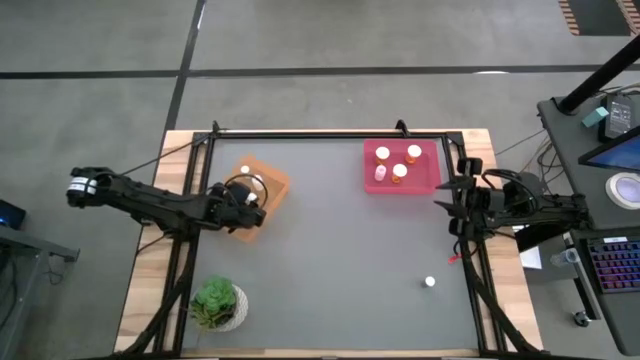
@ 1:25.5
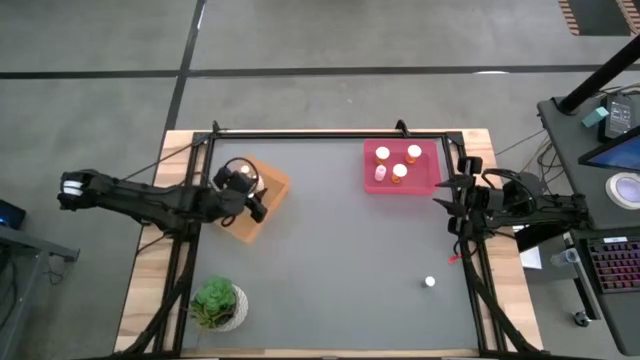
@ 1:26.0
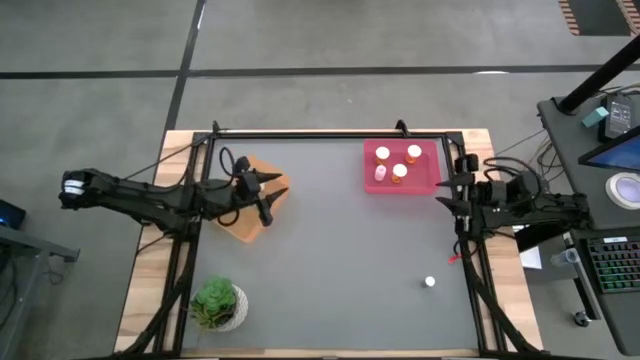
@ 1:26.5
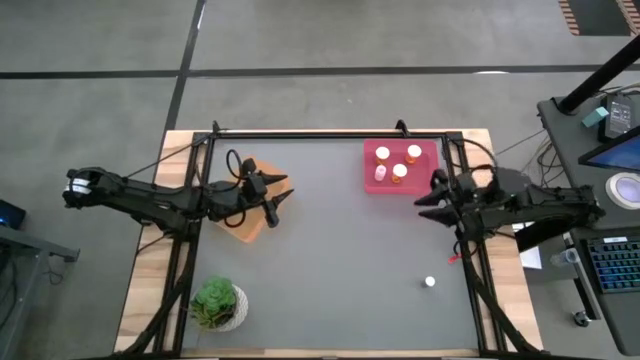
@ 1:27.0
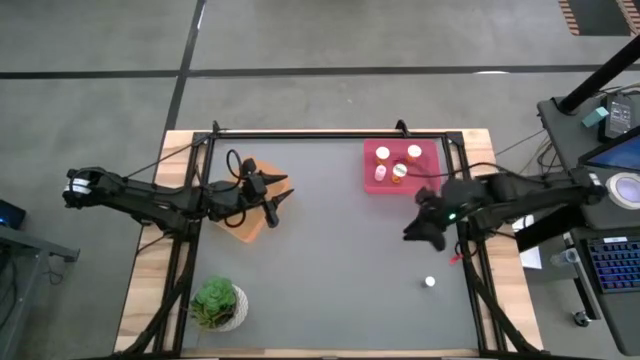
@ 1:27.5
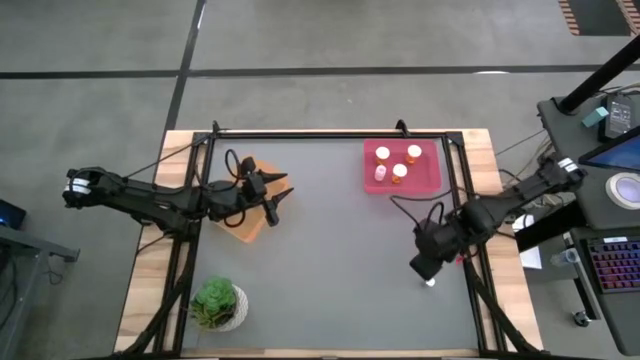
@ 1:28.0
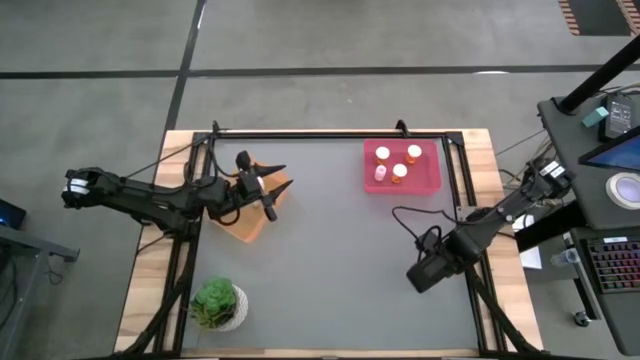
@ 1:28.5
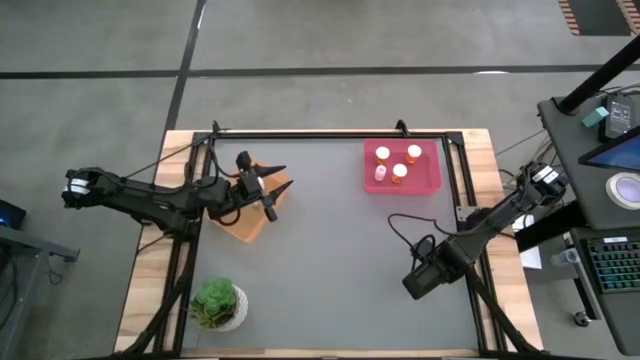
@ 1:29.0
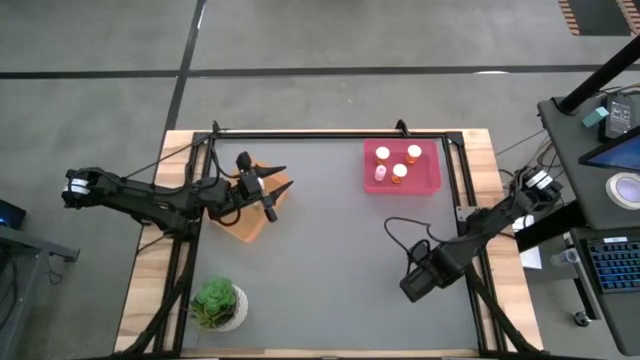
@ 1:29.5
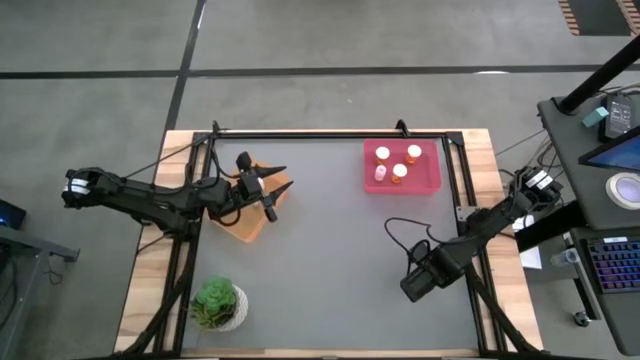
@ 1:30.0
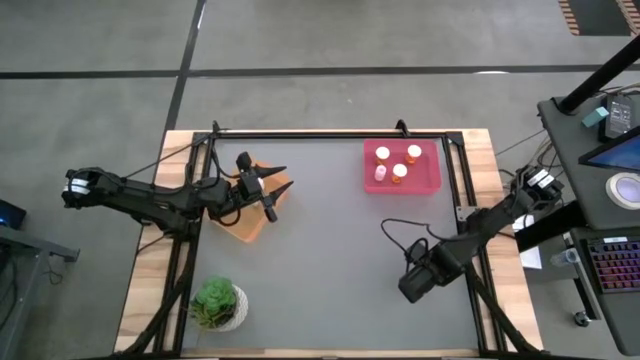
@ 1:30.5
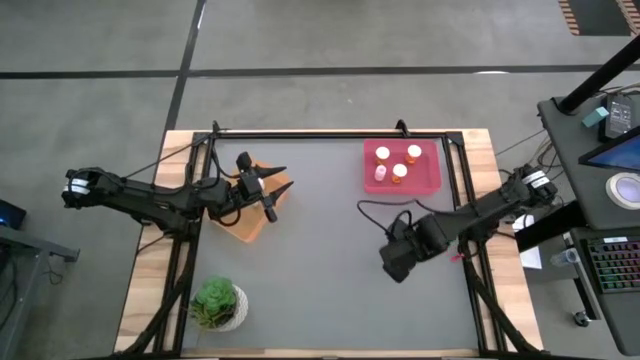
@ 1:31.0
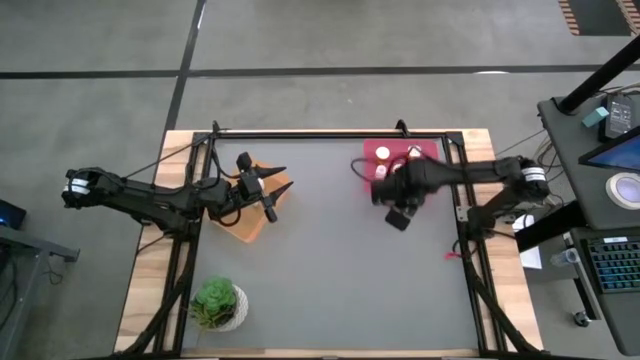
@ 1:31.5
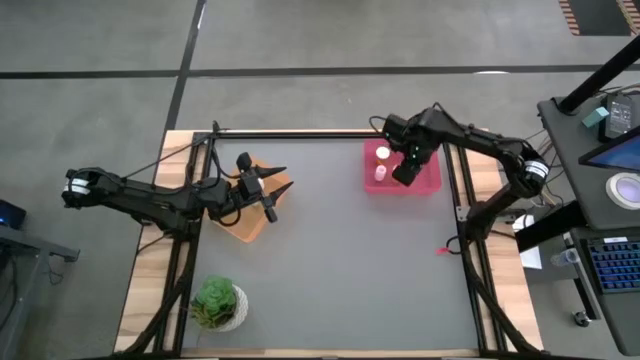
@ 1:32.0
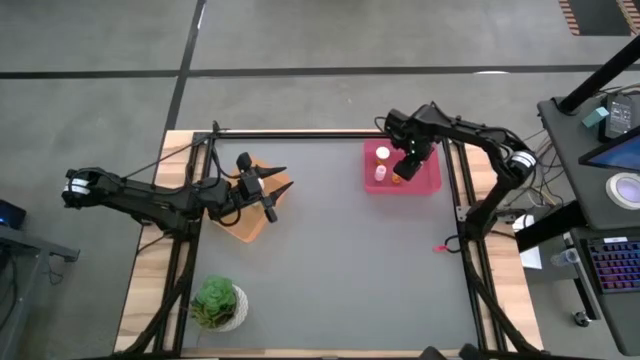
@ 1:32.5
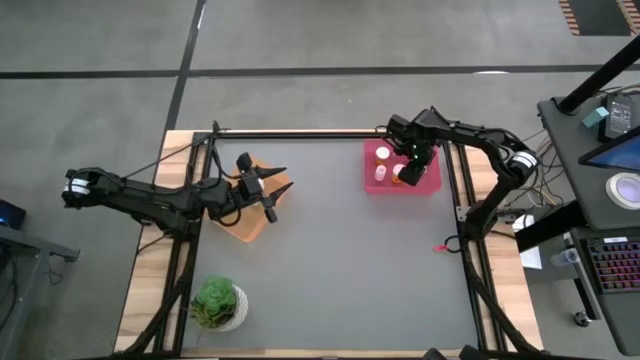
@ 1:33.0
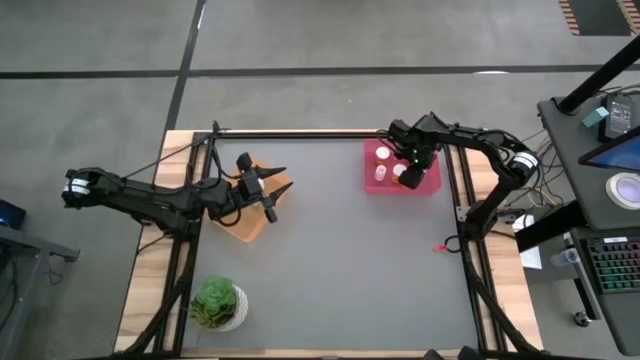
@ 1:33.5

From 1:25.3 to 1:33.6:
Task: Pick and place medicine bottles into bin by pill shape (circle, oval)
Put the blue capsule bottle into the pink bin

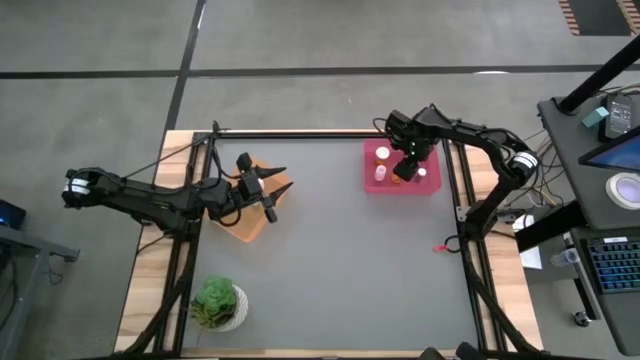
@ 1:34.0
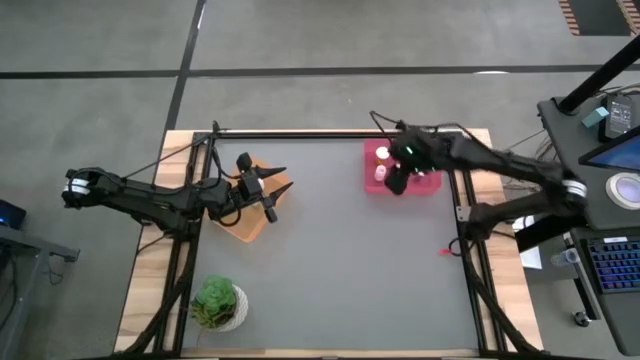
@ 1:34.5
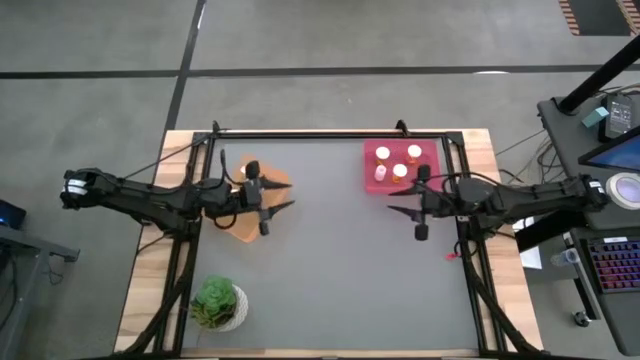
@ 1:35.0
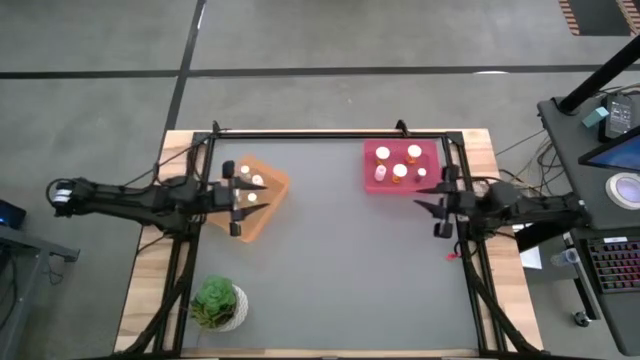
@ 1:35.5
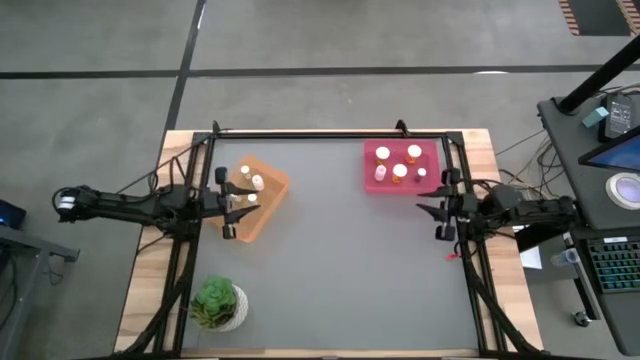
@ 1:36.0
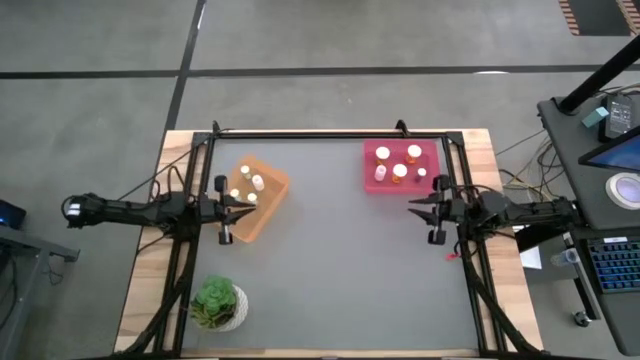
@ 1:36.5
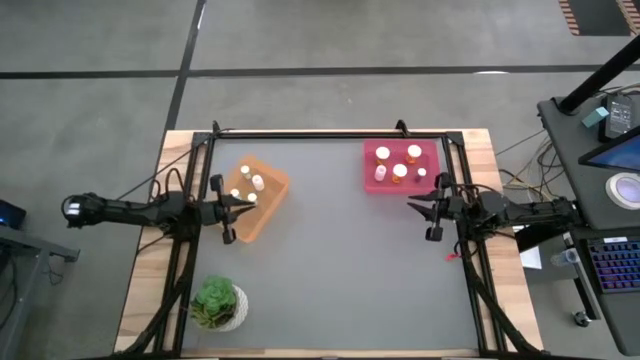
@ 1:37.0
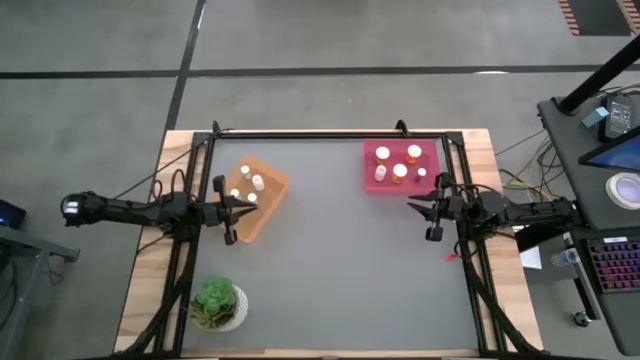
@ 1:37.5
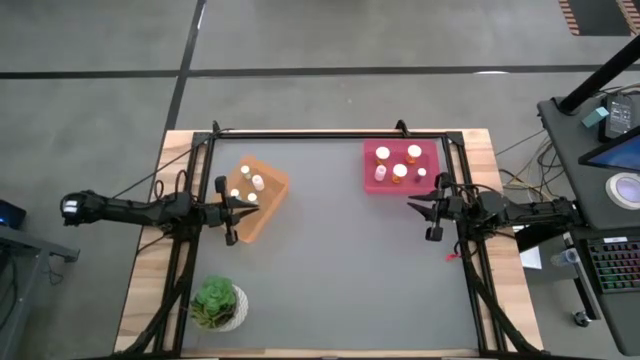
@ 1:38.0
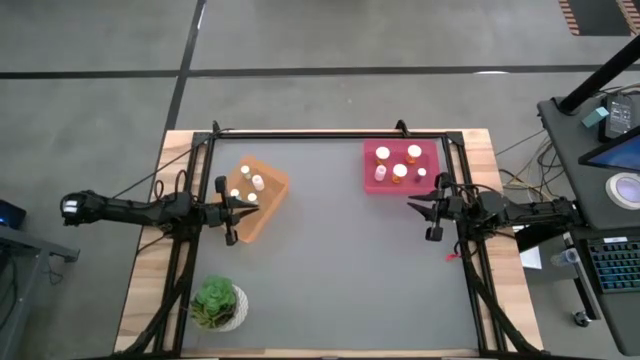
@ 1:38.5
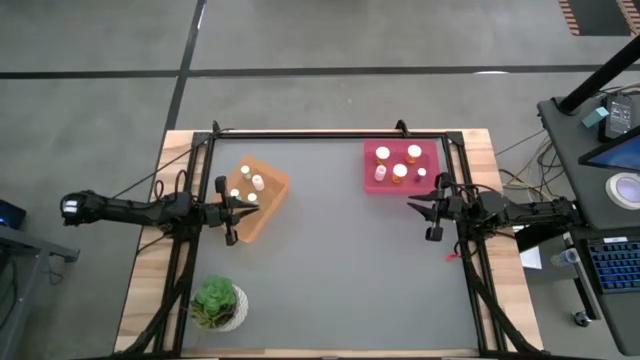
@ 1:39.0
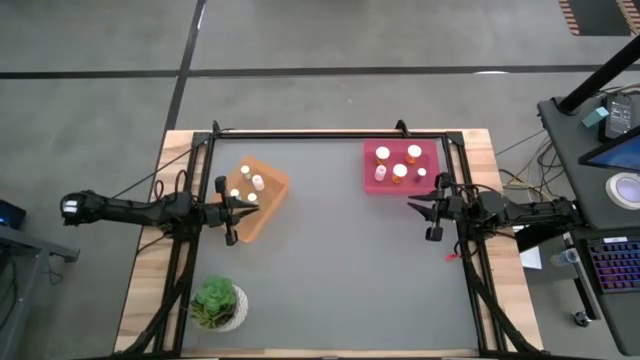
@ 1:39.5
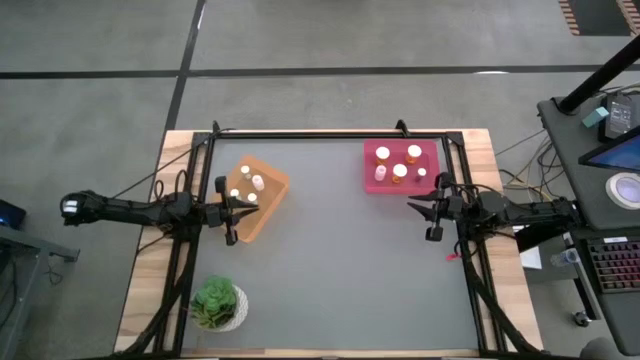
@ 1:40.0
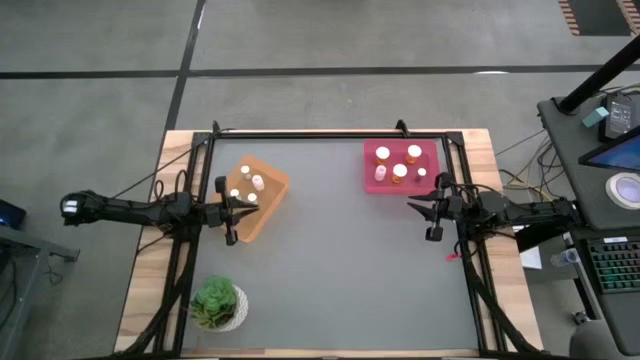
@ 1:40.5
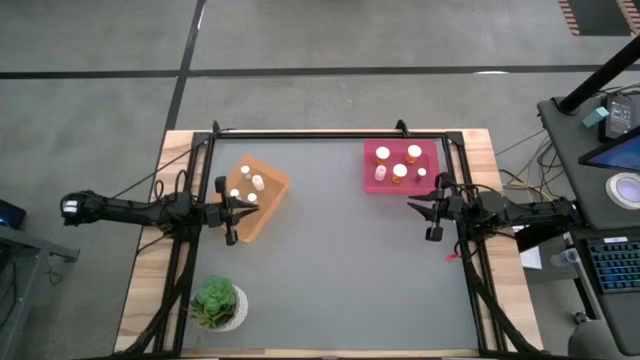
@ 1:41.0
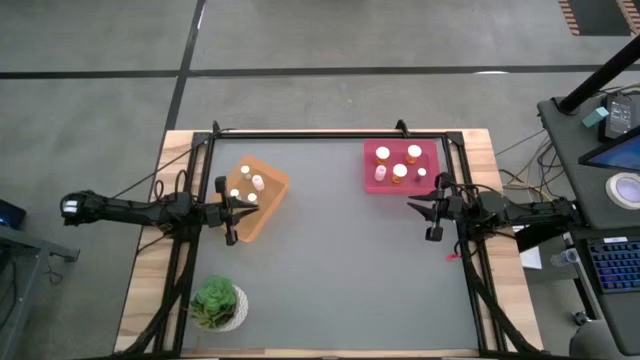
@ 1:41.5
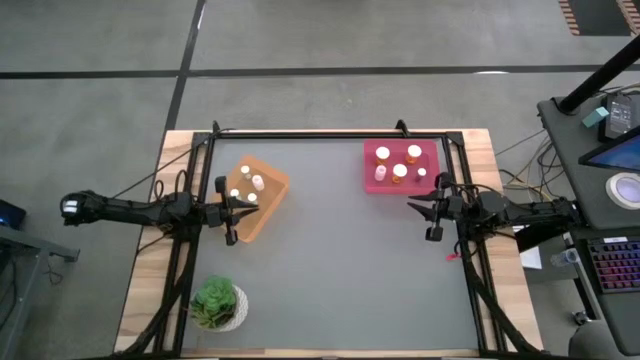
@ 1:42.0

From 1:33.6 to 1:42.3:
Return to Home Position

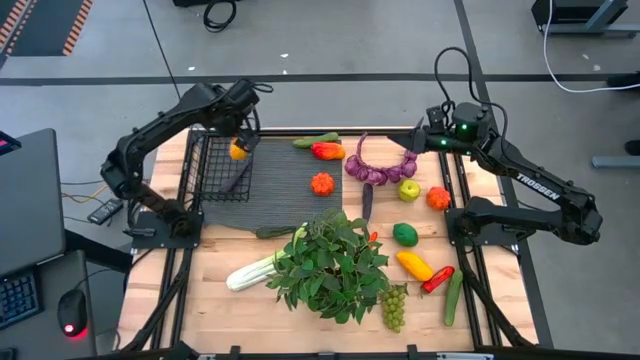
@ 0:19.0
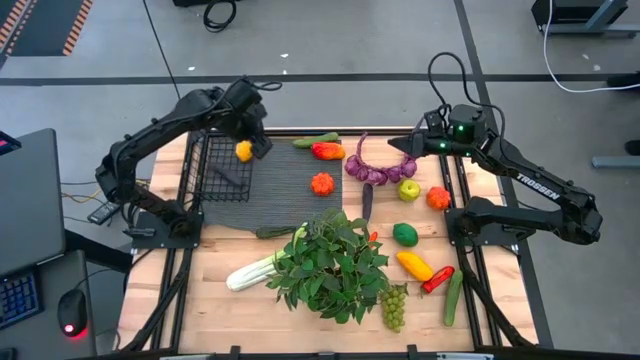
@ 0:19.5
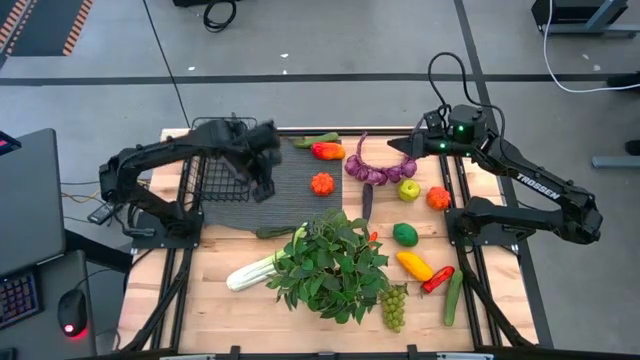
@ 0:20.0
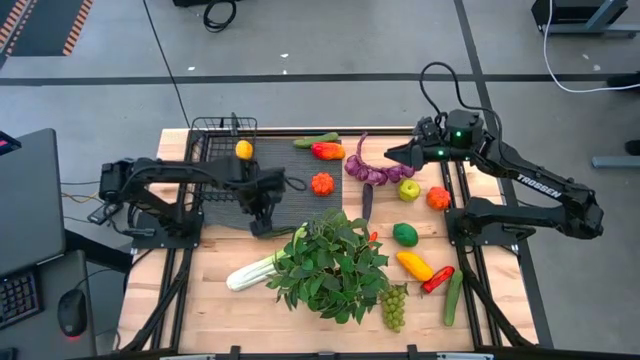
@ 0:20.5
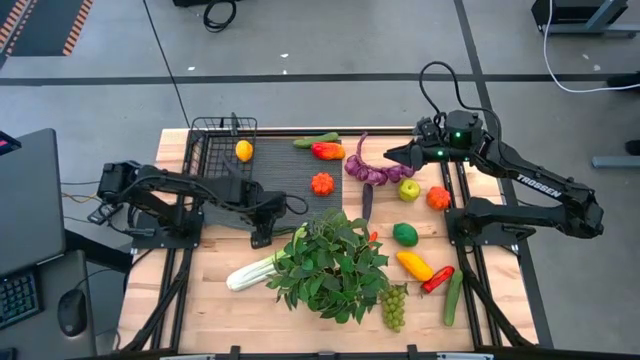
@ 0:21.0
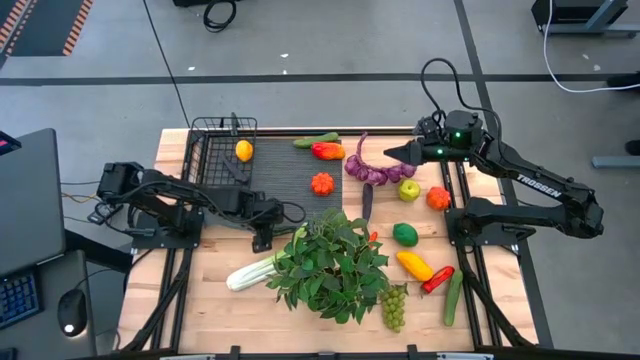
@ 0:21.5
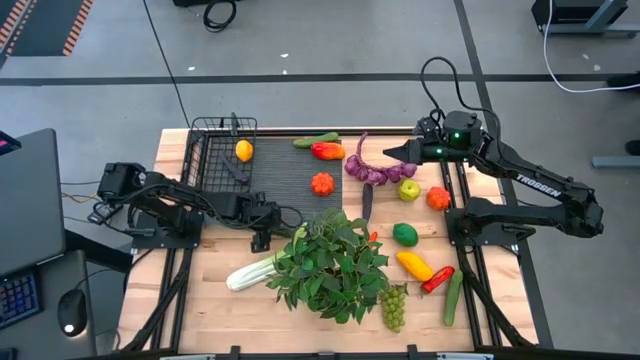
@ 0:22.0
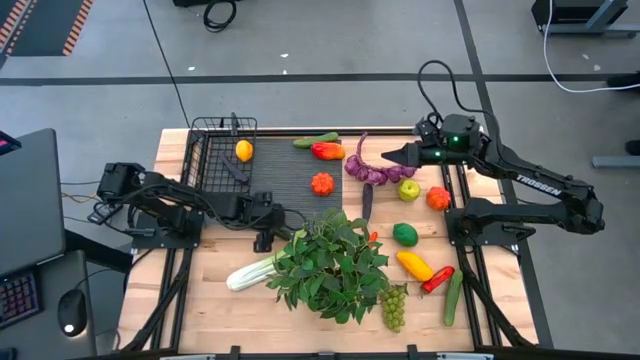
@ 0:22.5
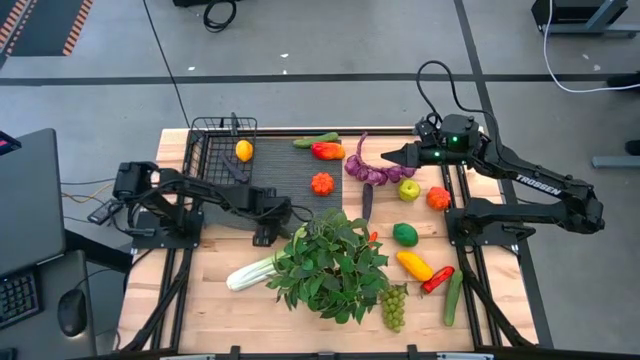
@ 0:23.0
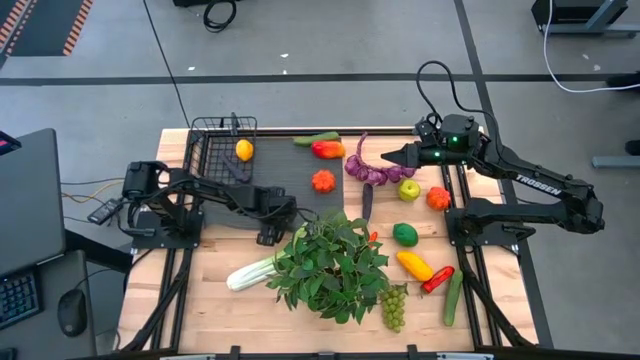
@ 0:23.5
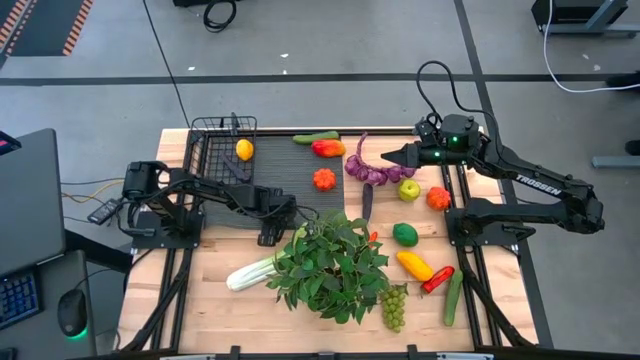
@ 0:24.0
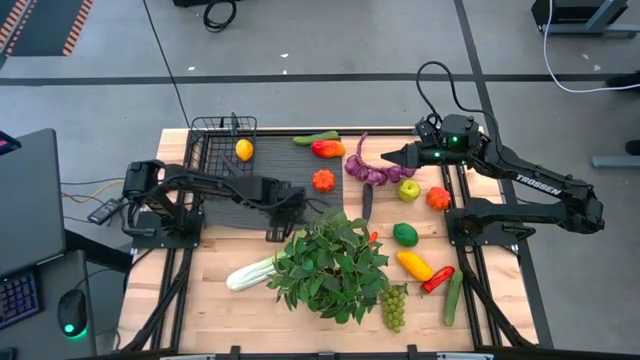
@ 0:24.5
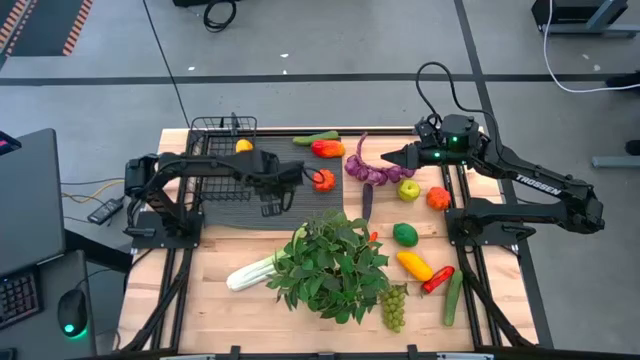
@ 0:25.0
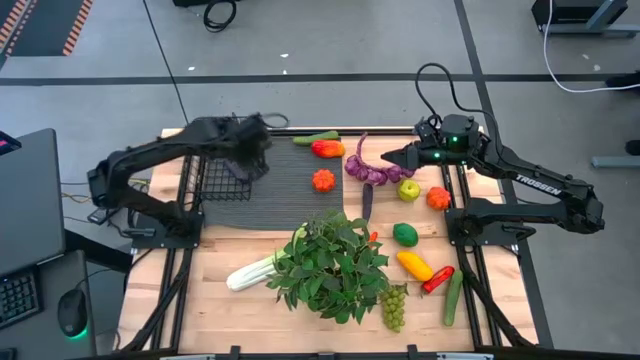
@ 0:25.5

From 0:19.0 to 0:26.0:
Task: Build produce basket
Put the green chili pepper into the wire basket
